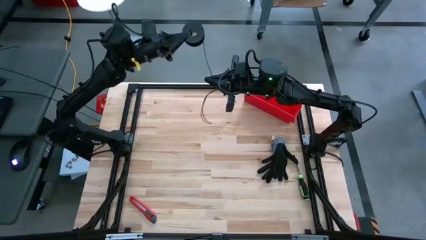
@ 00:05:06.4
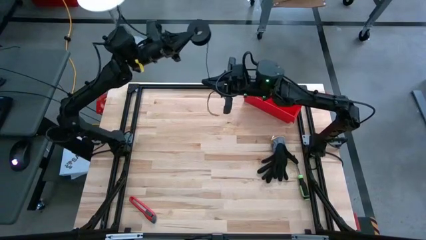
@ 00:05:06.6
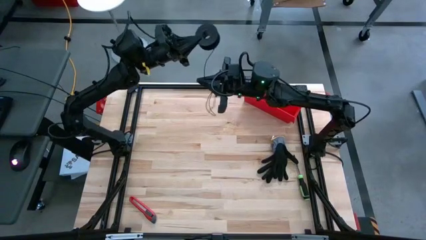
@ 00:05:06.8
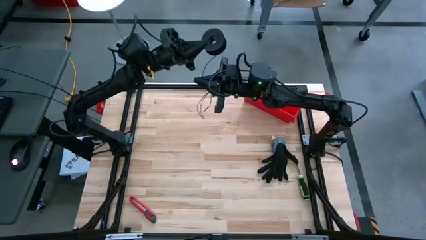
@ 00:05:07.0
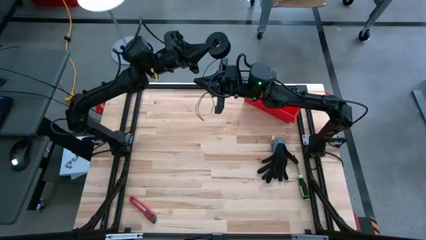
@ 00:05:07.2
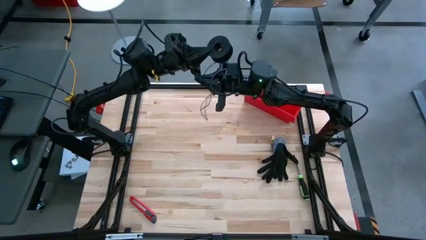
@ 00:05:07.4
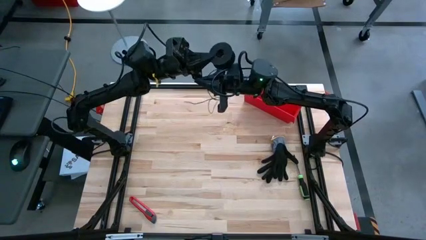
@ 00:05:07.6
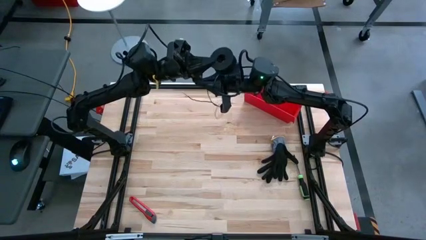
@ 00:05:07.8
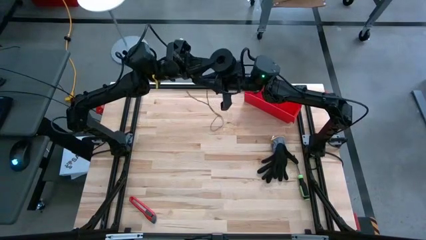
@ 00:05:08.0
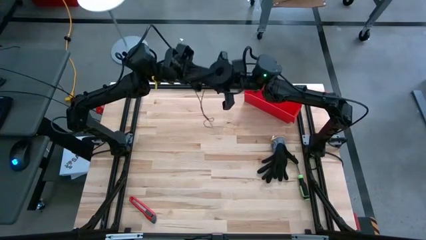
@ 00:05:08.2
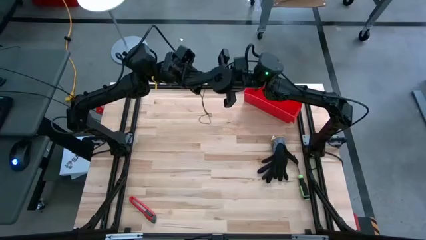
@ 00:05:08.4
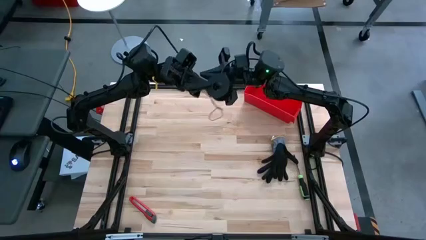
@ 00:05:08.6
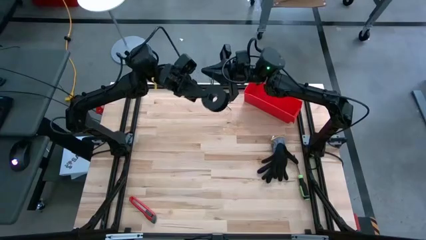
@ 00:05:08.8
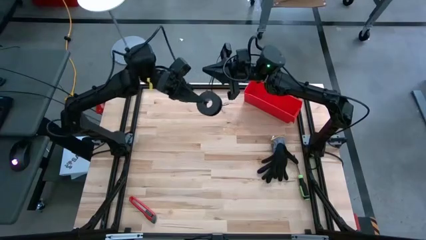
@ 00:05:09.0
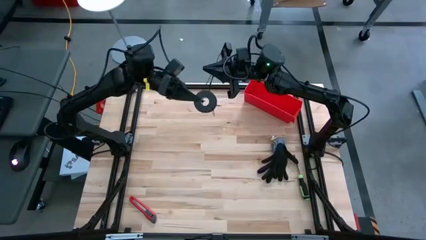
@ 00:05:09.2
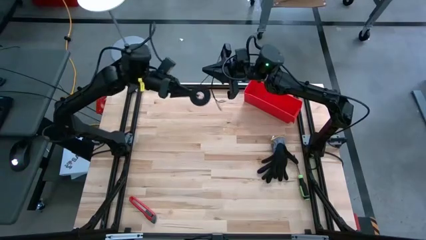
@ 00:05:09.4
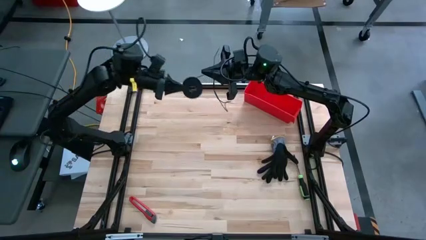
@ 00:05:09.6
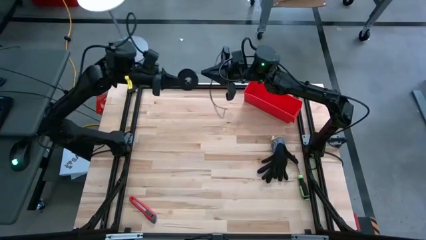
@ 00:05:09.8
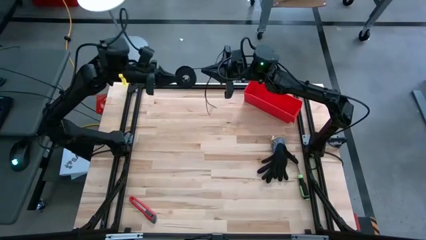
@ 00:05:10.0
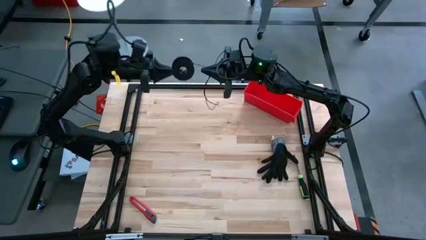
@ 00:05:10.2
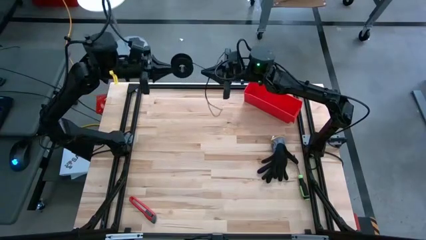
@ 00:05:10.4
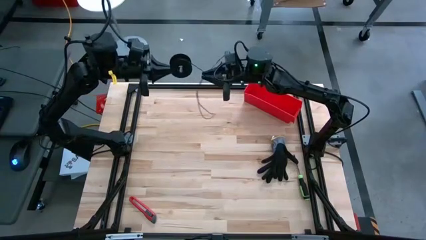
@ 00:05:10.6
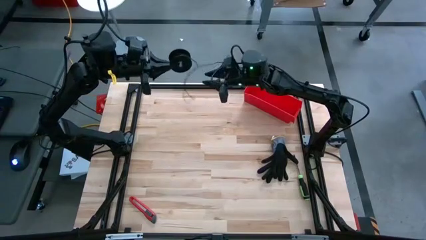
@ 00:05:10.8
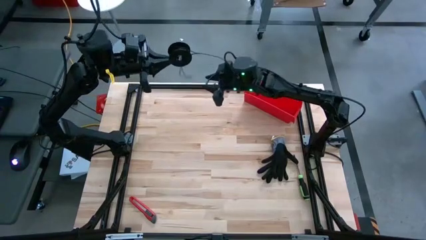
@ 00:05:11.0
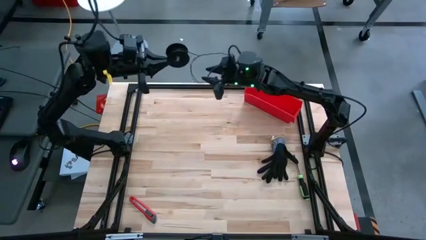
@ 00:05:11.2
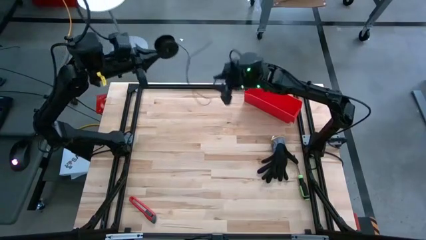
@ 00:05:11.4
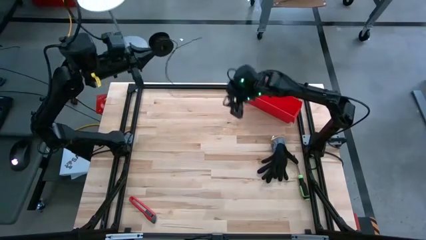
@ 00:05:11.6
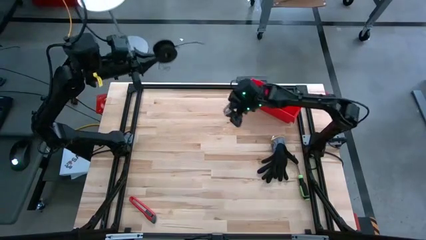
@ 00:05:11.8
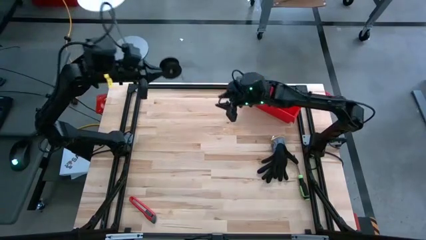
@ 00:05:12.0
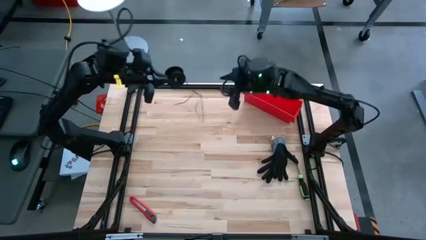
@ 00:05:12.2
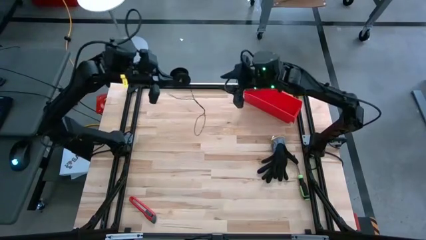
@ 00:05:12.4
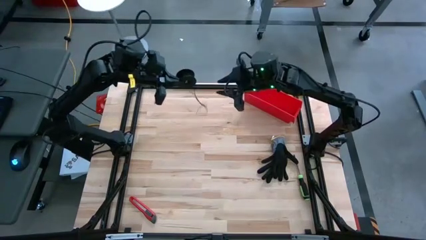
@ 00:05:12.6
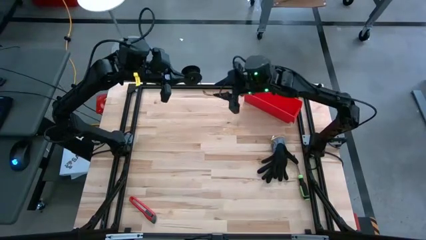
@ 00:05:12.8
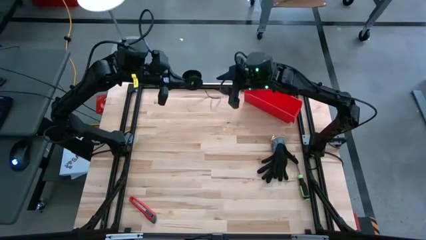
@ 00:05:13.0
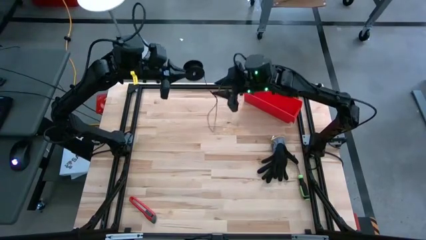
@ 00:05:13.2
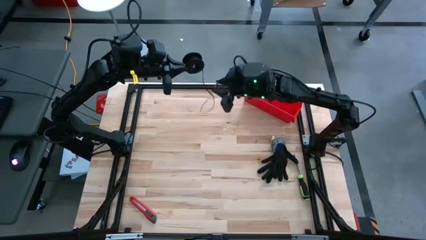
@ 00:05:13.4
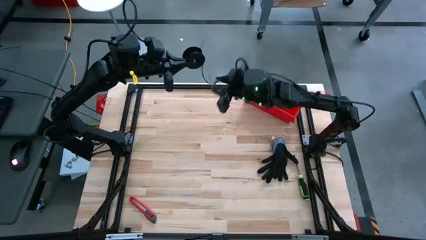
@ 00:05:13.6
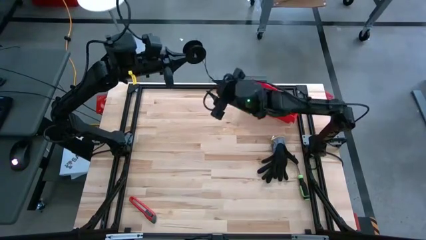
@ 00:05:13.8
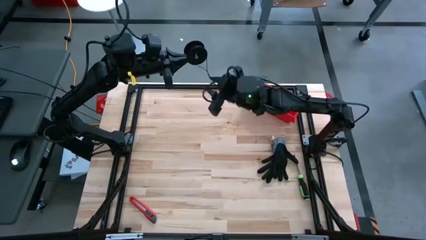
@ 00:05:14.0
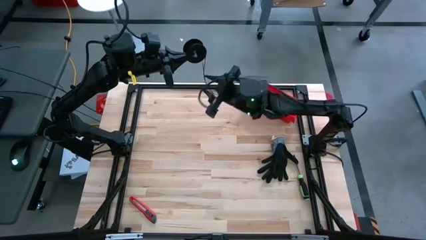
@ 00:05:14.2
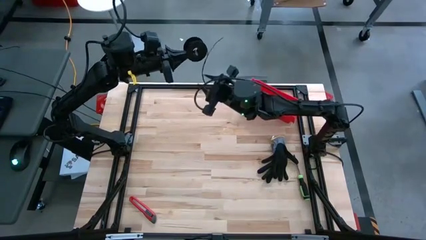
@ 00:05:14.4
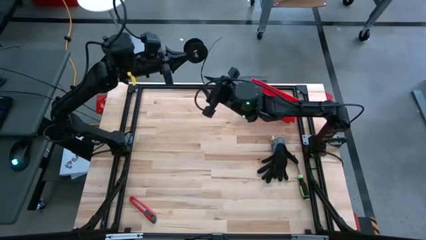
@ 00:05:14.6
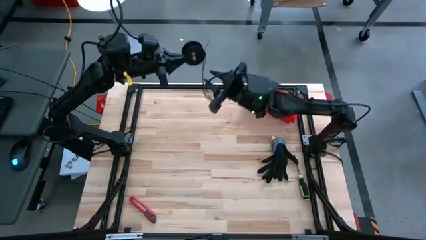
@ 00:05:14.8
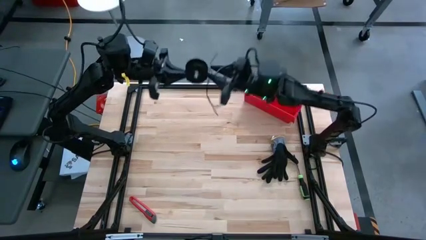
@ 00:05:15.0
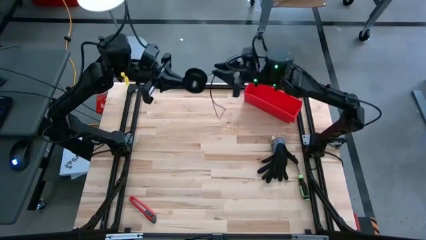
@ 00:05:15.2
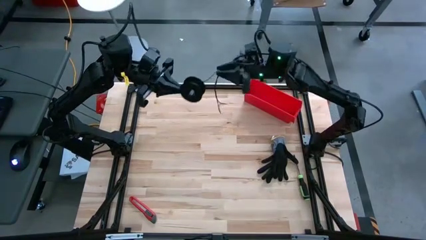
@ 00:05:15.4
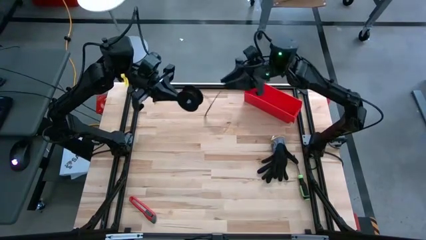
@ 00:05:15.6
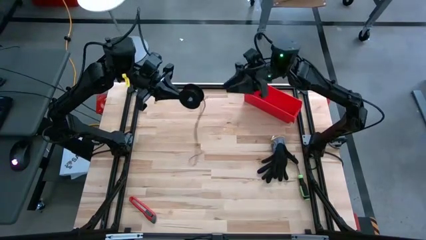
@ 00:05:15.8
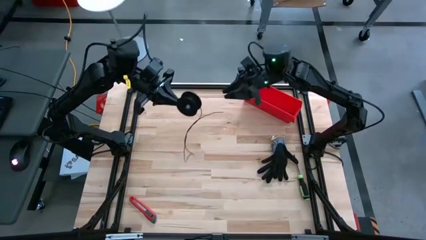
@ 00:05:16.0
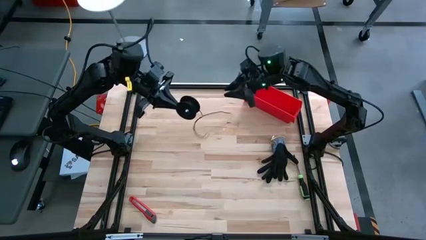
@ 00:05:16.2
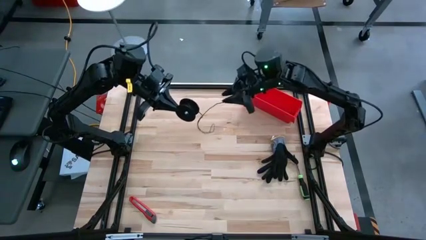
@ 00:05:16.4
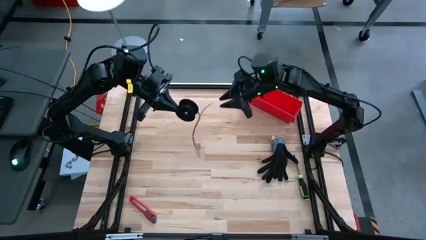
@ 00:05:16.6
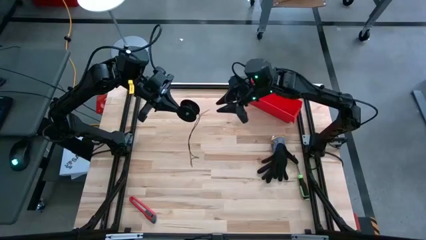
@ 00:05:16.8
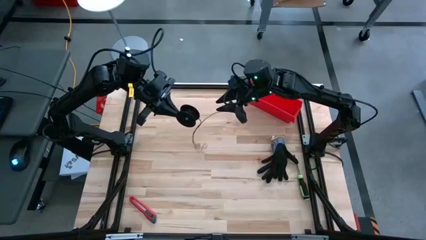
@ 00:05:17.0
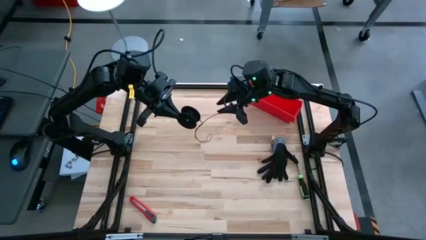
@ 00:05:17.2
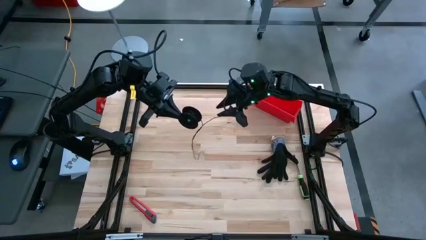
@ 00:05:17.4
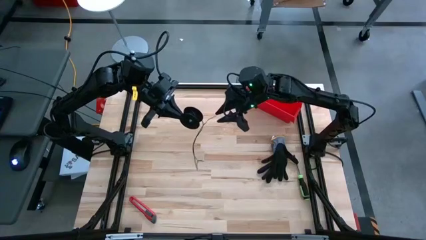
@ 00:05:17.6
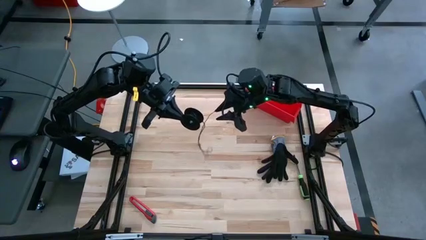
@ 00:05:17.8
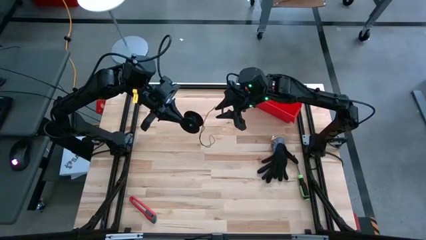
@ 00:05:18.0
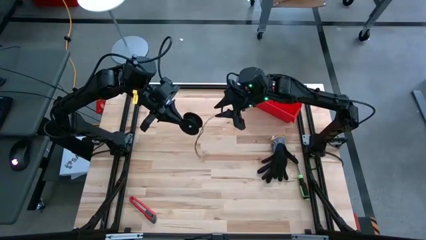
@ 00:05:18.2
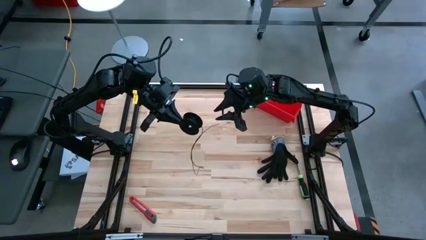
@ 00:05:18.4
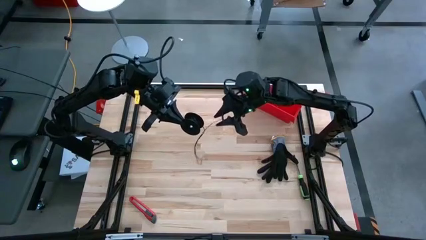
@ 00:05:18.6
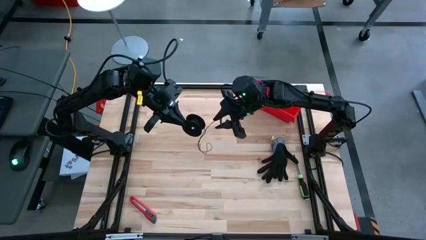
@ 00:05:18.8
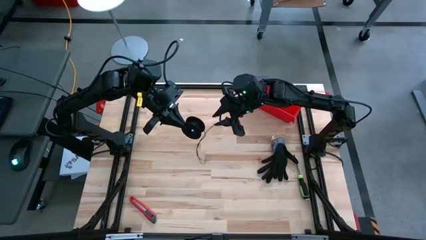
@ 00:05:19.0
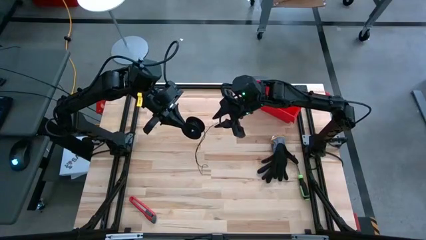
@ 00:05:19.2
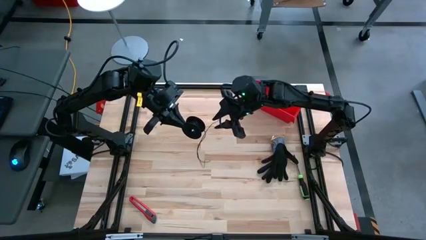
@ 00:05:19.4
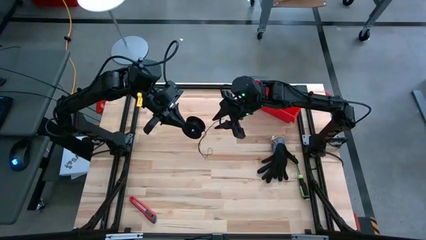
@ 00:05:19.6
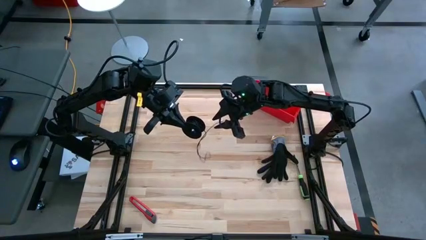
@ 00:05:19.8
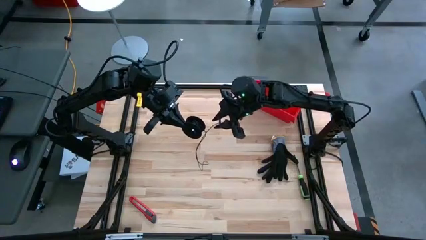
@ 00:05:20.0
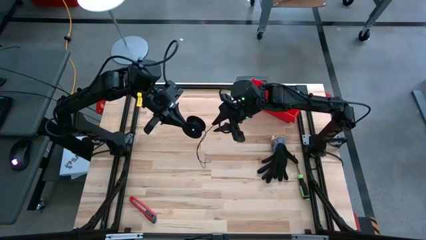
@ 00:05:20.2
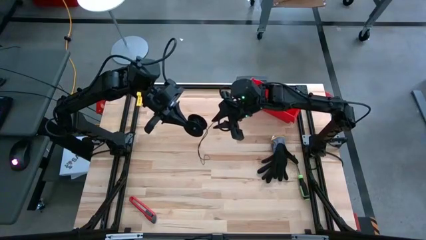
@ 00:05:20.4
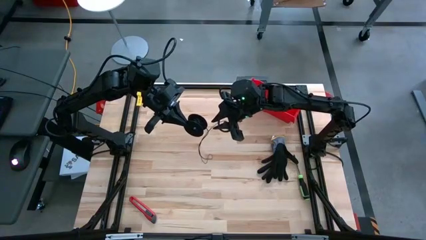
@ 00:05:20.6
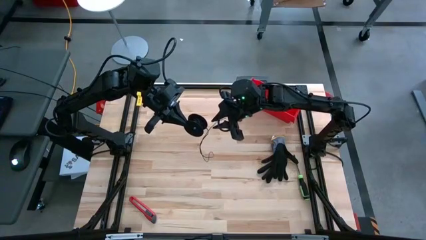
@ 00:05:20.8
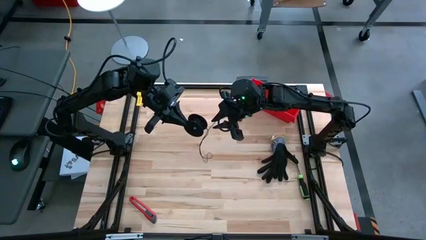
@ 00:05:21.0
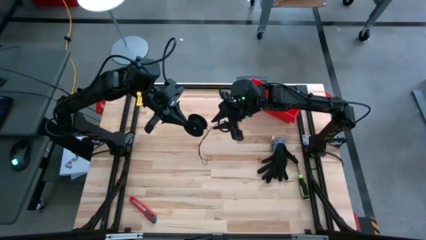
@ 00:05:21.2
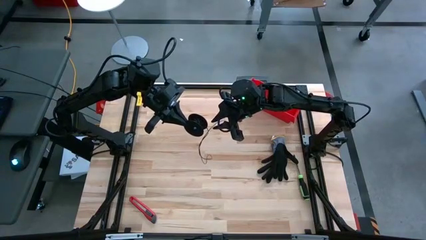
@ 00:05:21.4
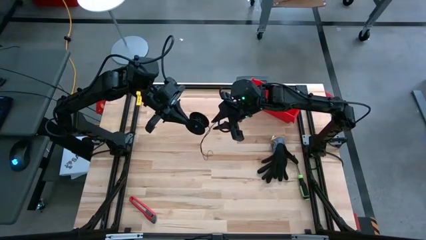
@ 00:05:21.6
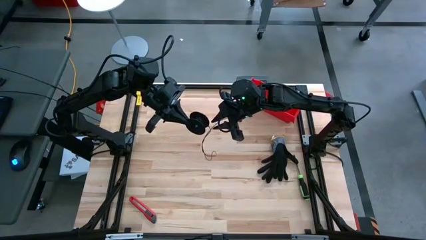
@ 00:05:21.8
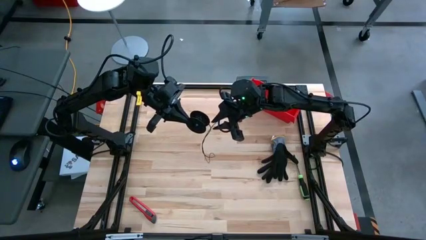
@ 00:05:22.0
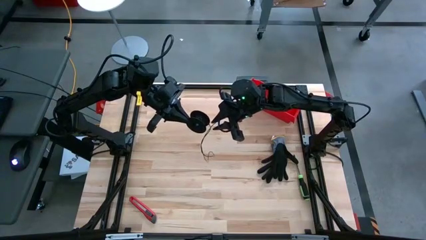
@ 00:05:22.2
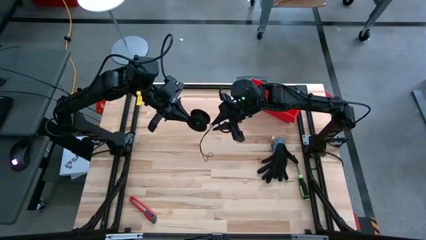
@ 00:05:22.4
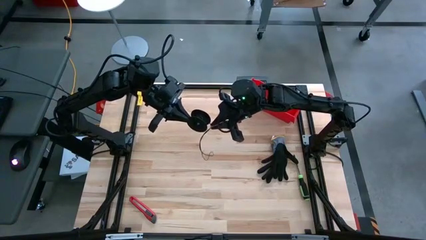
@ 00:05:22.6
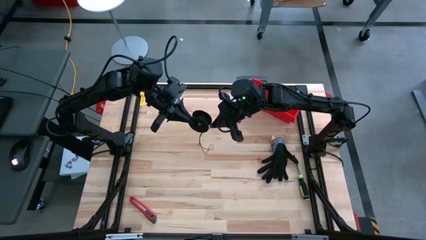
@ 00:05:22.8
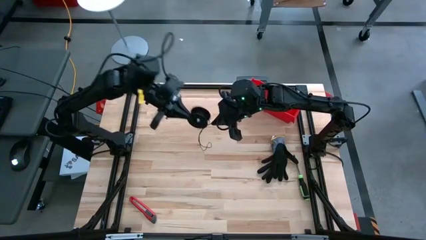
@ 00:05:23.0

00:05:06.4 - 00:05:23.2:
Task: Coil cords
Coil the black wire on the spool
